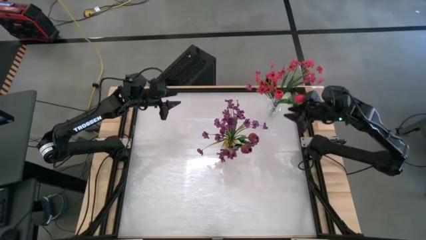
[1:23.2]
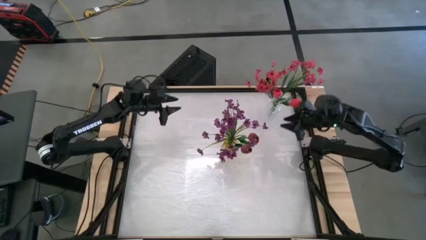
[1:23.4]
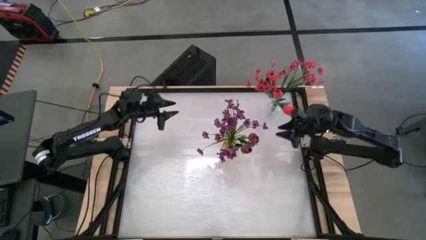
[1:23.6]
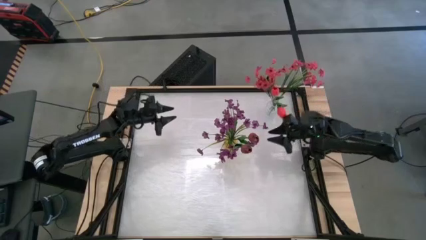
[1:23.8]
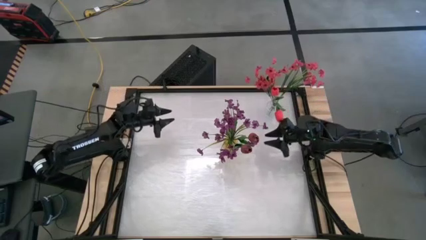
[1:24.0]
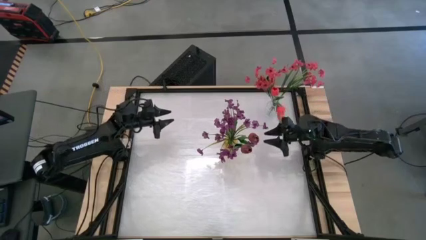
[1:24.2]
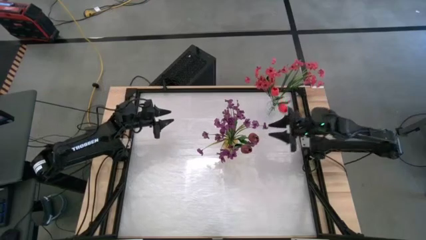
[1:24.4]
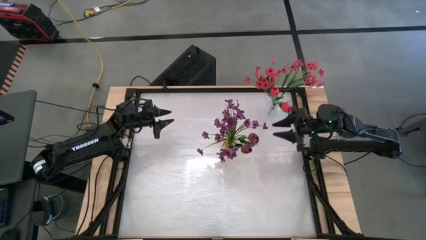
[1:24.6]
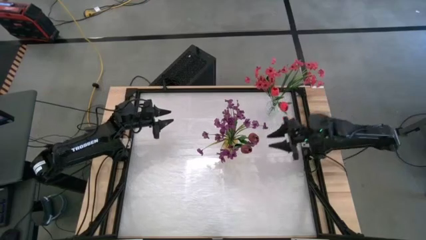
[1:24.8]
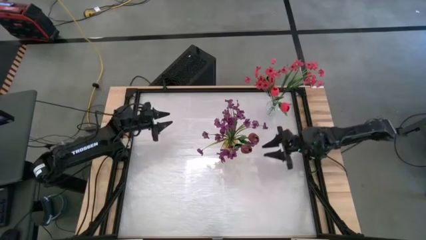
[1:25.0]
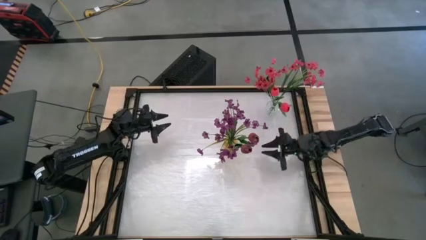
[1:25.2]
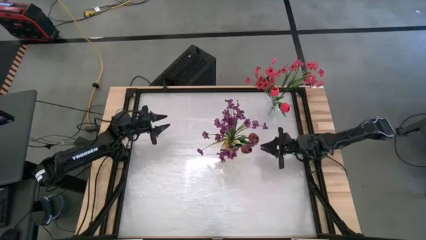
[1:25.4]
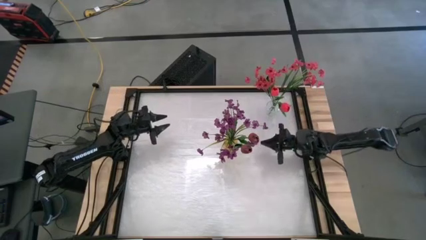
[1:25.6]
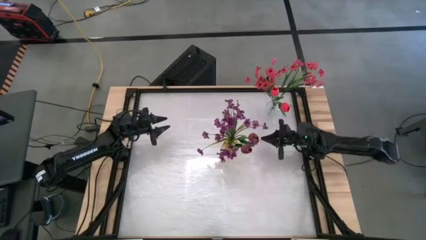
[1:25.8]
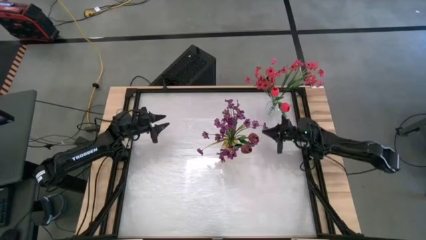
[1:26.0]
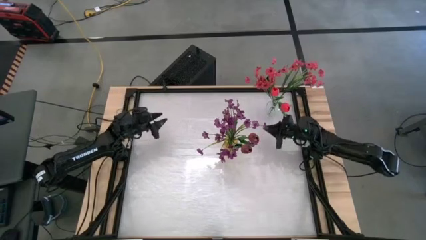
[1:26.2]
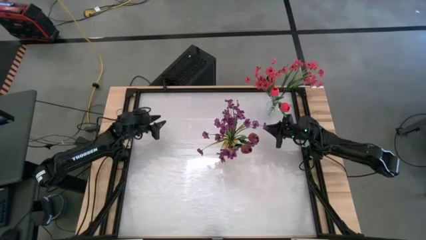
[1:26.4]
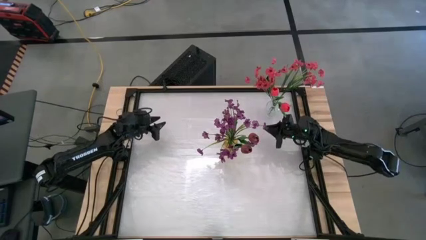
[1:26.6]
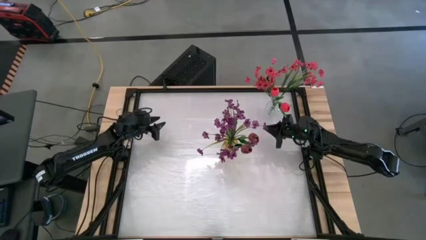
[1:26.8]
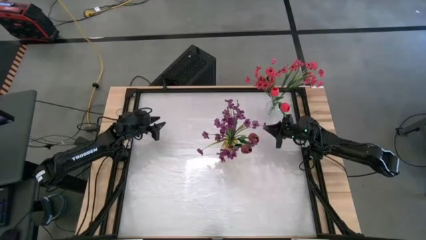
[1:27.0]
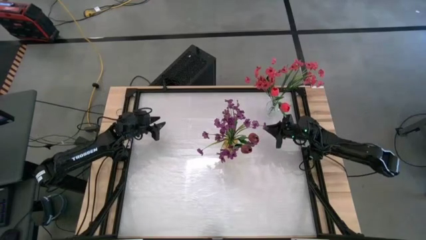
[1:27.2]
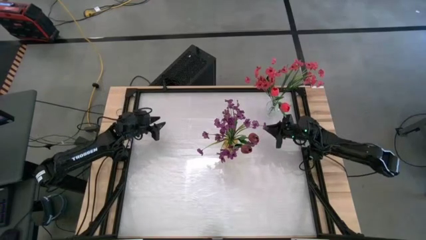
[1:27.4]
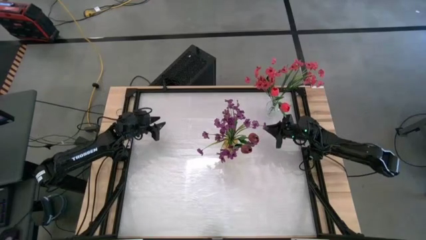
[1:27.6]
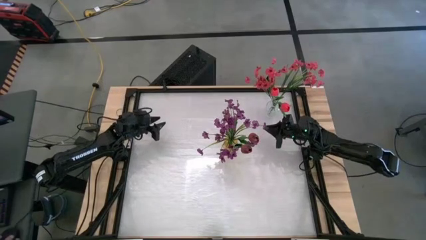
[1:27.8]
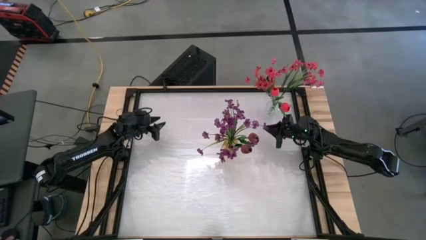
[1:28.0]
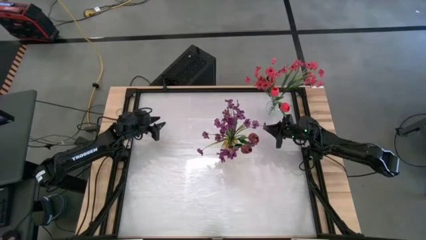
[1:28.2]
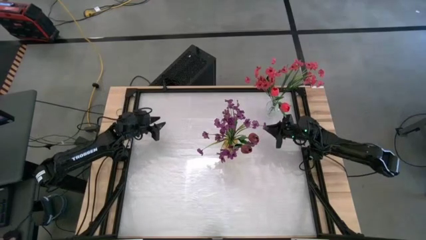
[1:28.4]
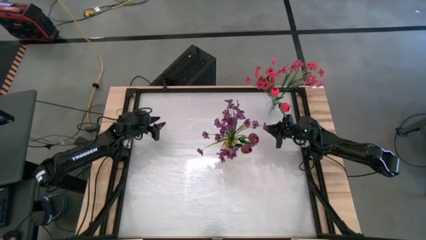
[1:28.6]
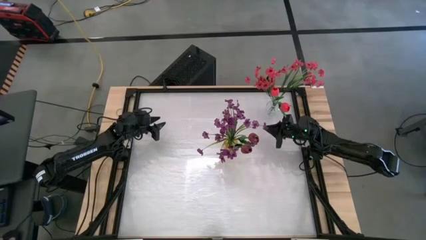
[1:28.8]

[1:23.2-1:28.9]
Task: Sort flowers into vase by color
Return to Home Position
